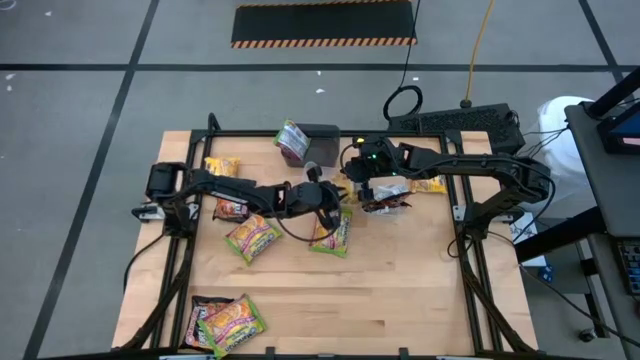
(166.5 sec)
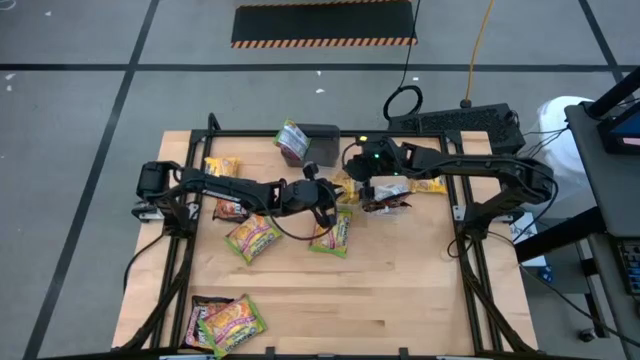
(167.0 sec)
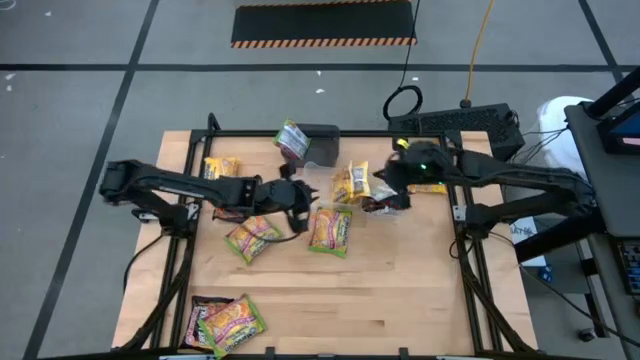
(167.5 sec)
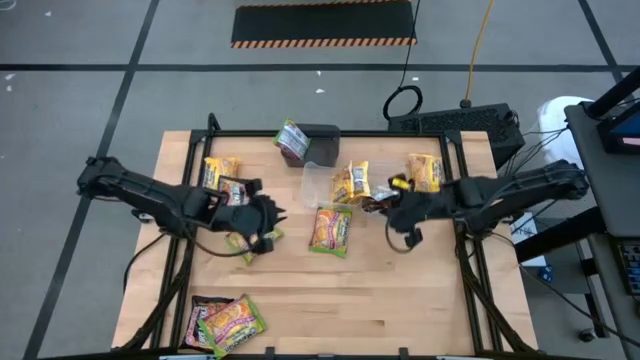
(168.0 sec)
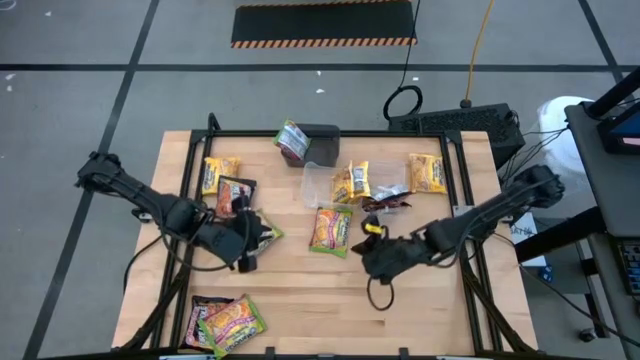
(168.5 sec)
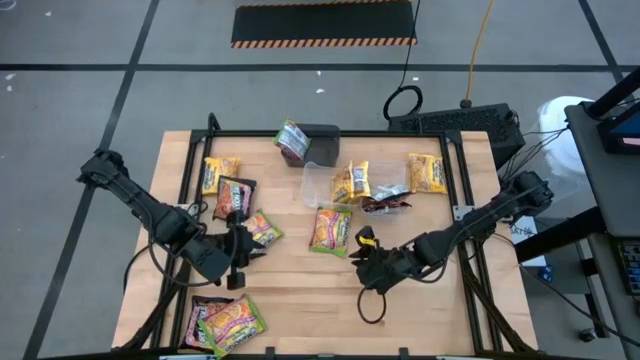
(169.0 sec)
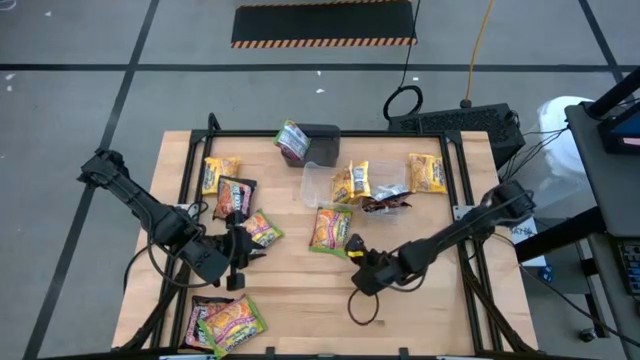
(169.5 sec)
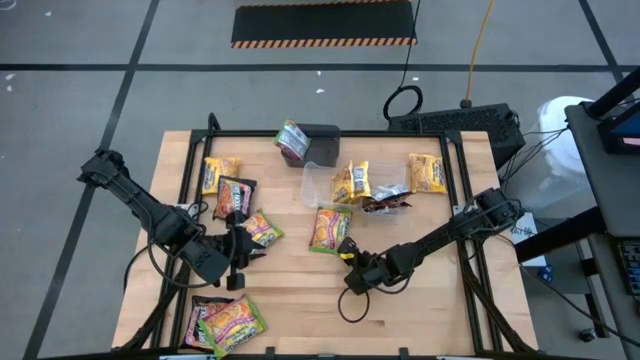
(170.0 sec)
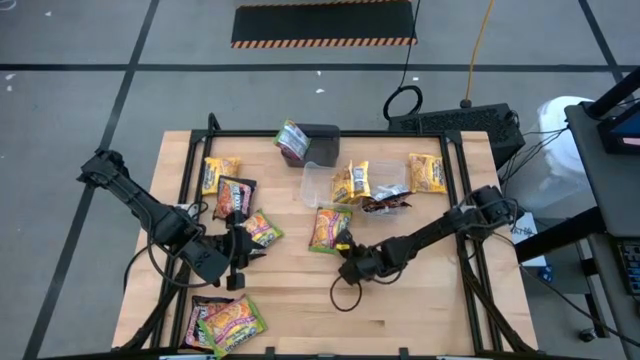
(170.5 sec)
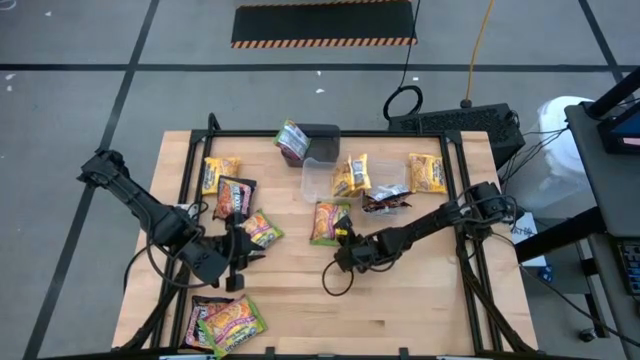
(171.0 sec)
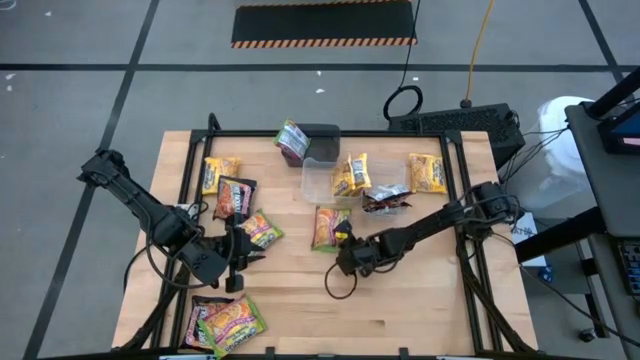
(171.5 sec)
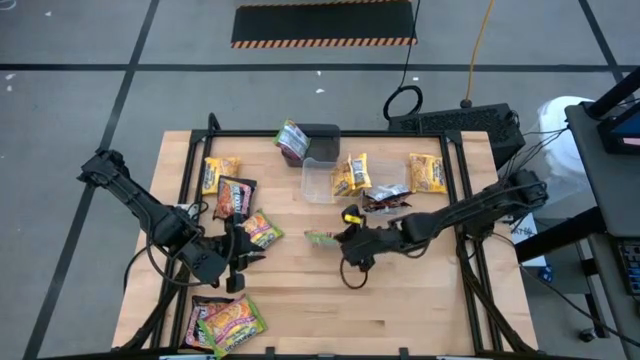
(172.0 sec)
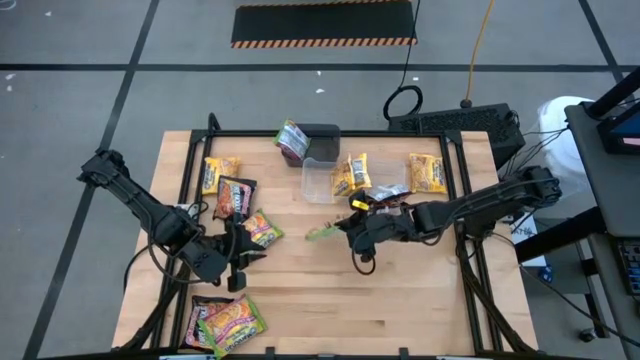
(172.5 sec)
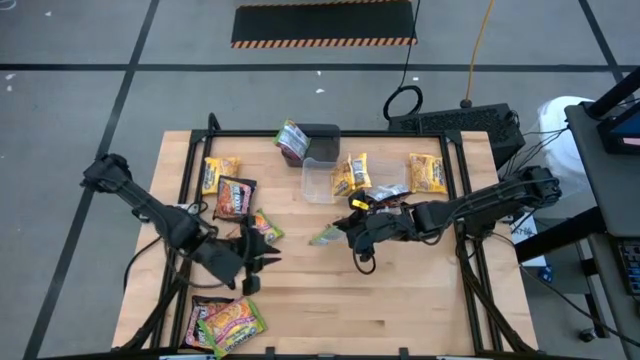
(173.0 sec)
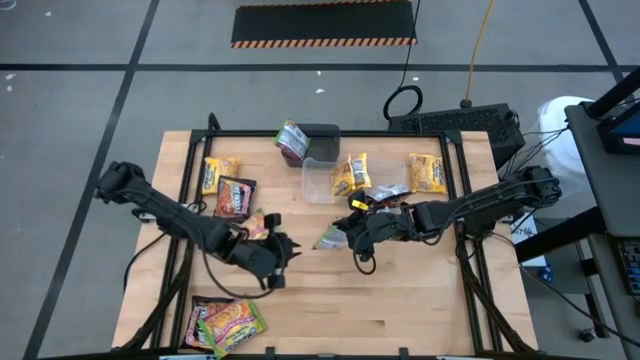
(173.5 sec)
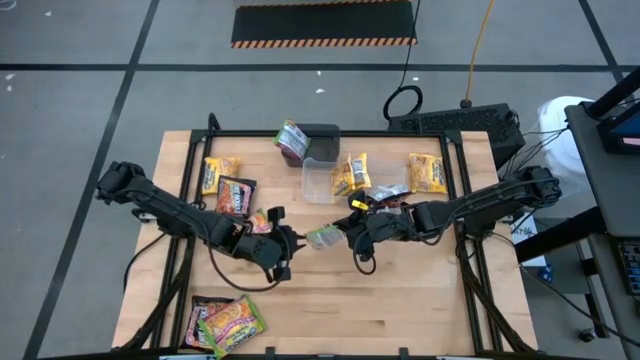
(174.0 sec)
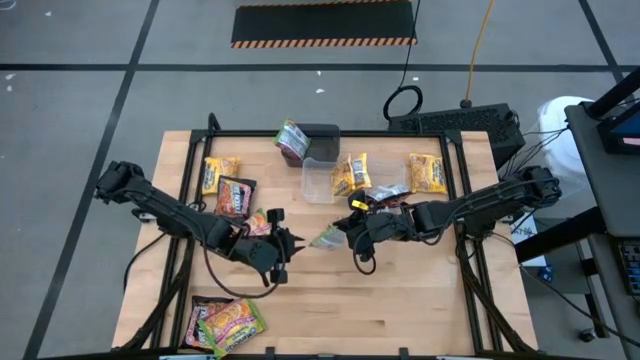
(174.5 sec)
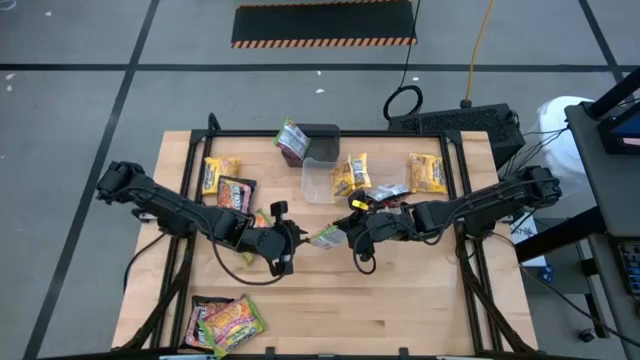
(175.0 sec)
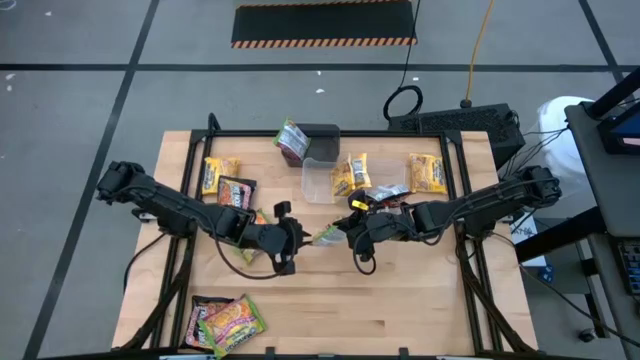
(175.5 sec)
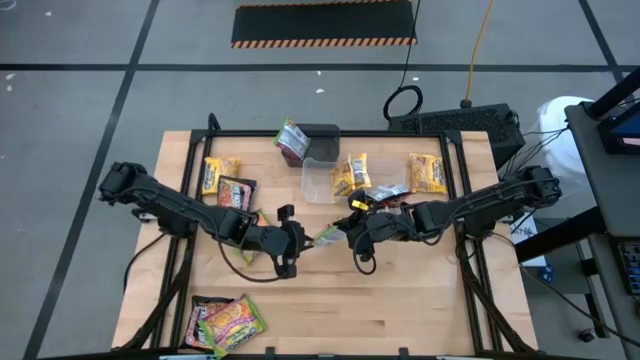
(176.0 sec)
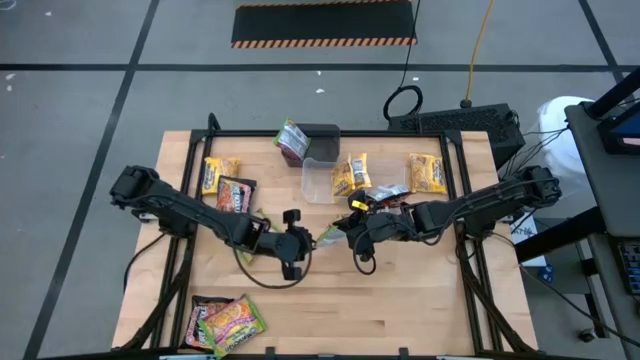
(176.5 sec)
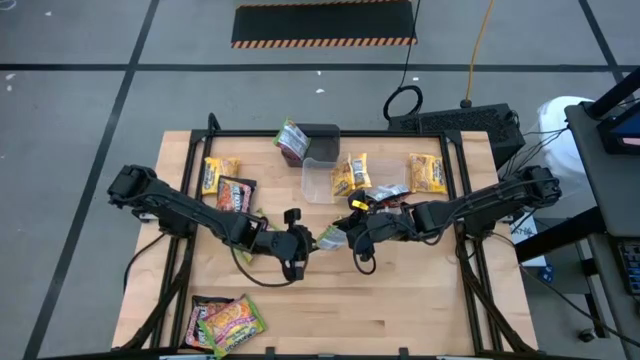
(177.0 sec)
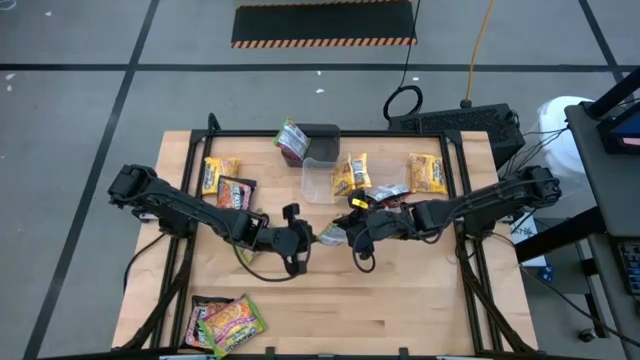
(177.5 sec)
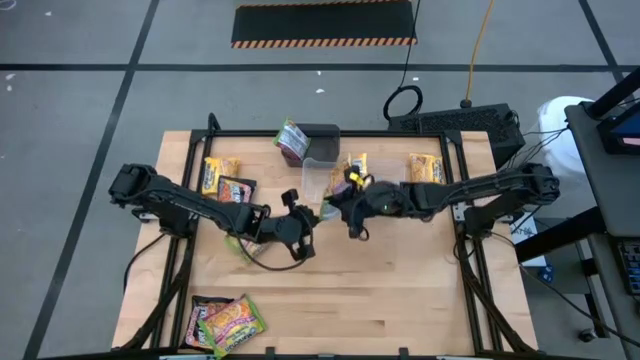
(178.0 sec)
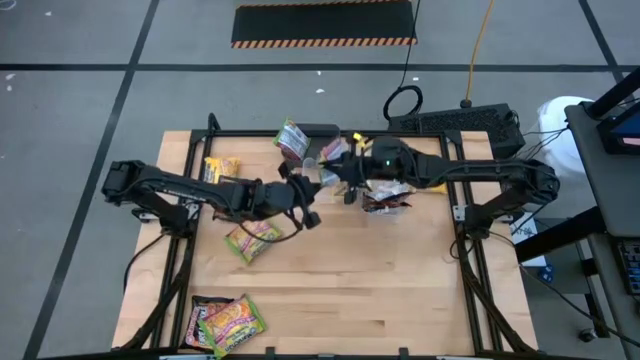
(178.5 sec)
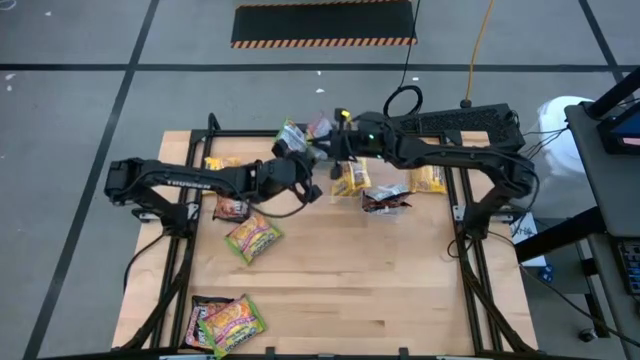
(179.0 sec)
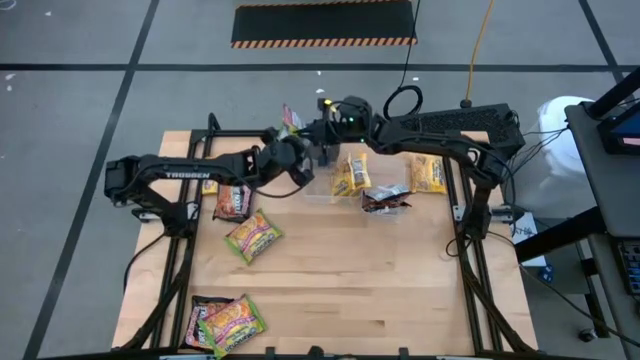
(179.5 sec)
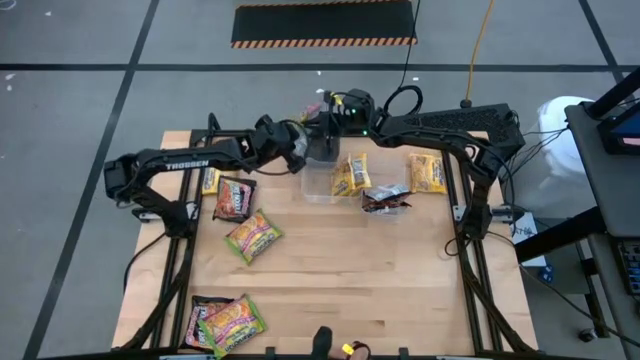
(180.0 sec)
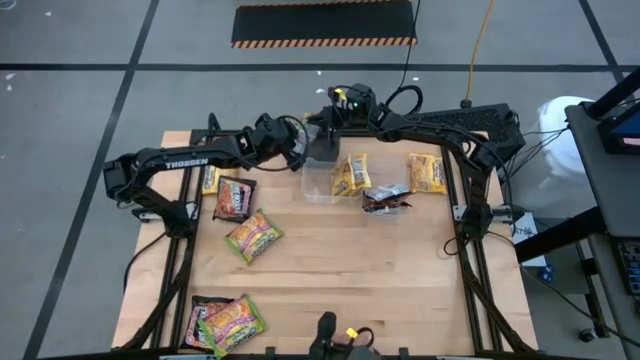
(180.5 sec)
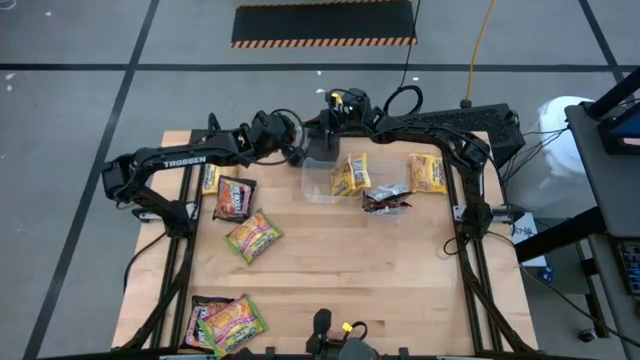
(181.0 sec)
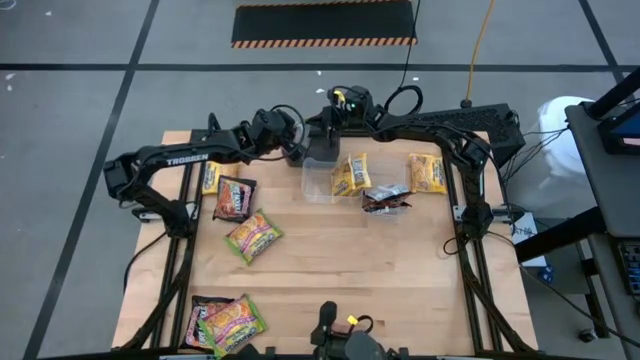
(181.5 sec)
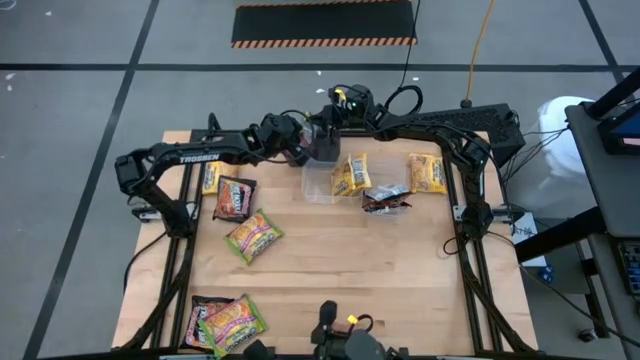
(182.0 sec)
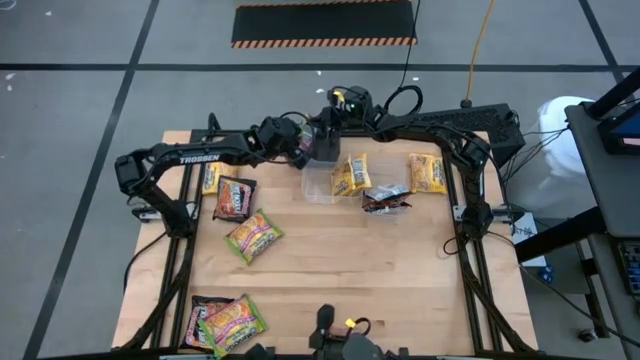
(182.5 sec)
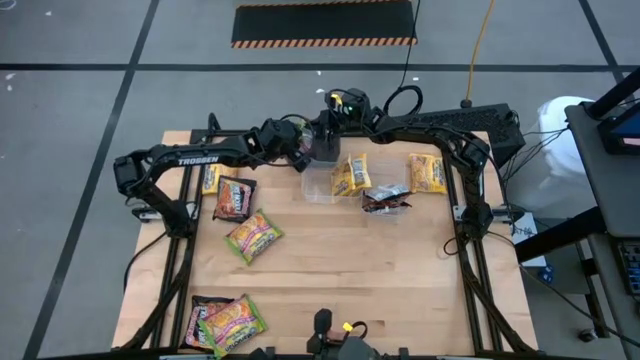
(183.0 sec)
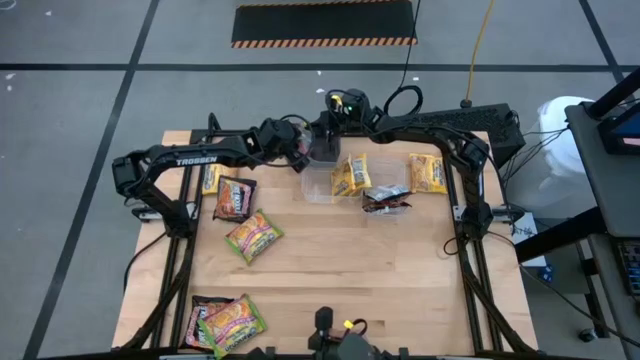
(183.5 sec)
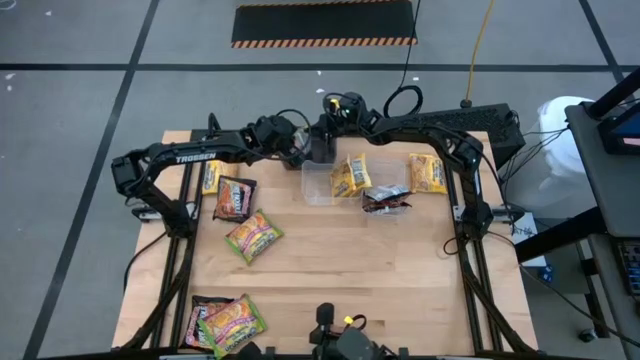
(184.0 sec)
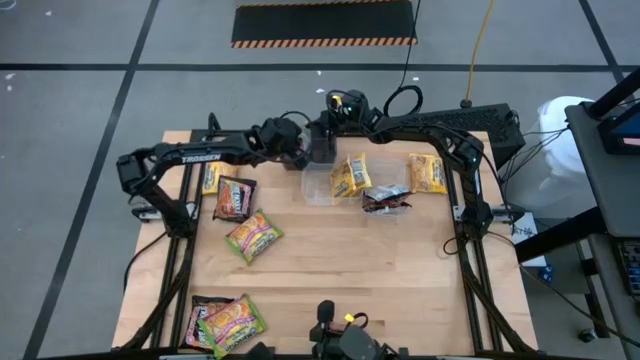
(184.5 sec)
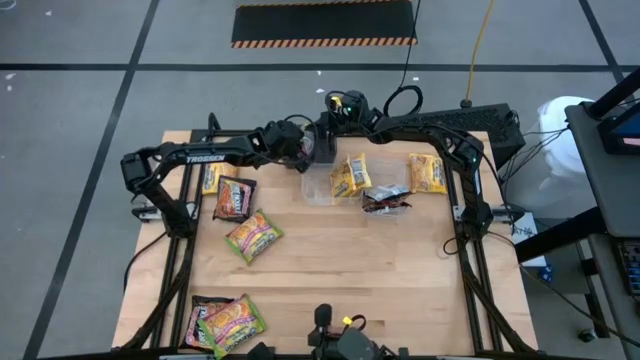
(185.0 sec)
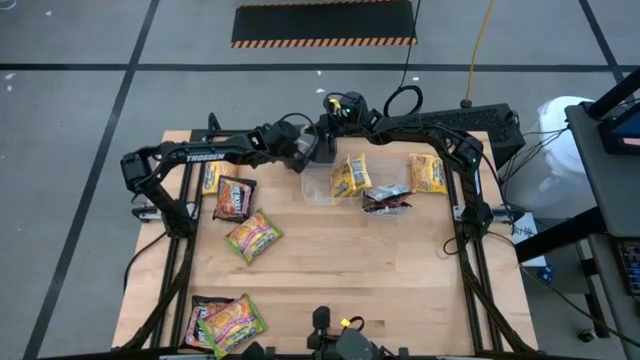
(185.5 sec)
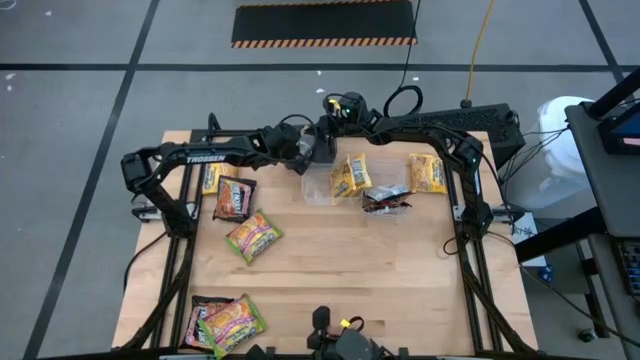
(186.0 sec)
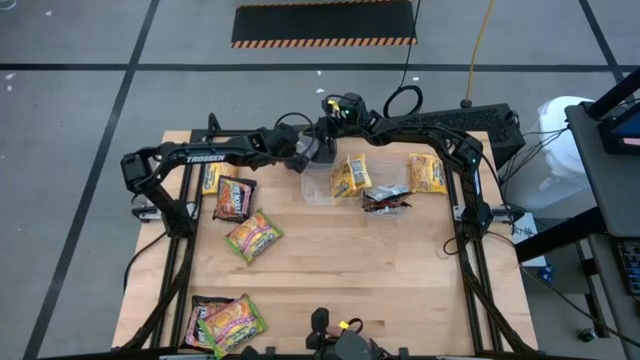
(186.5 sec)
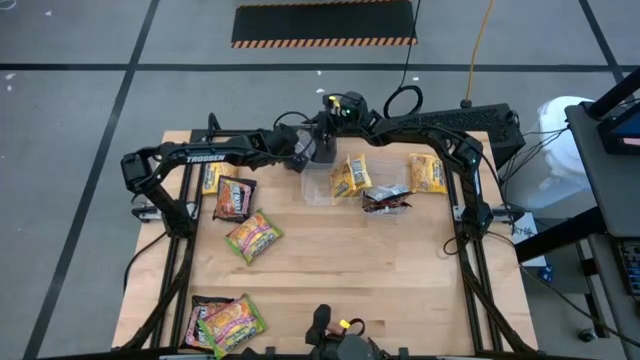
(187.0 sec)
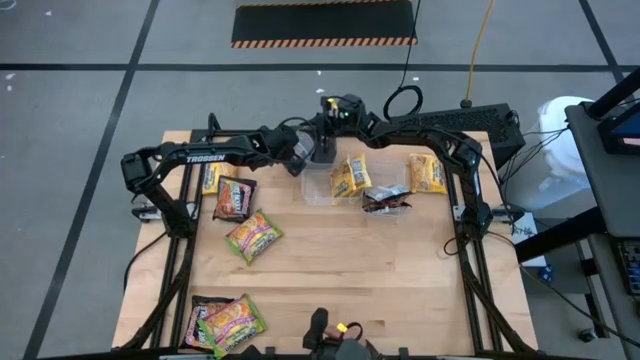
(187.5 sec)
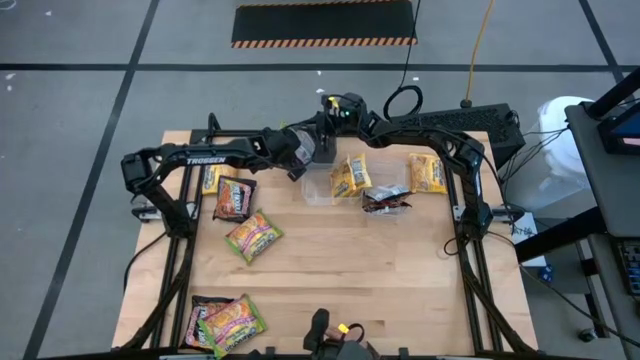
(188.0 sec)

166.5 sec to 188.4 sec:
Task: Sort Maruchan noodles
Put the green noodle pack into the black bin
